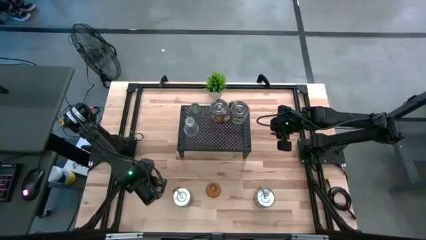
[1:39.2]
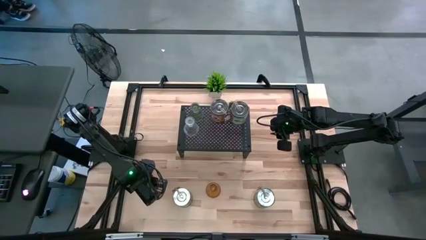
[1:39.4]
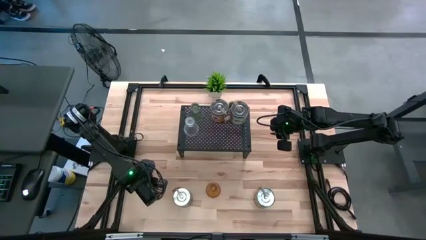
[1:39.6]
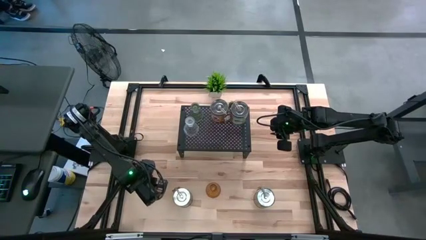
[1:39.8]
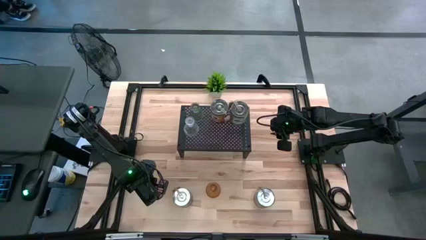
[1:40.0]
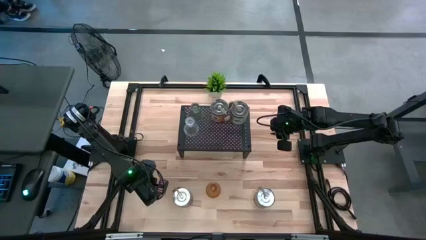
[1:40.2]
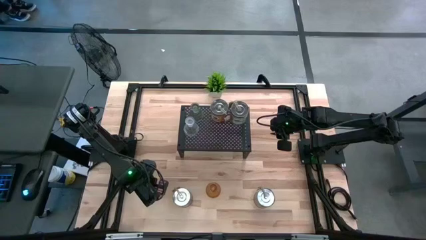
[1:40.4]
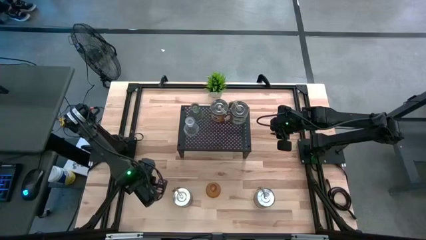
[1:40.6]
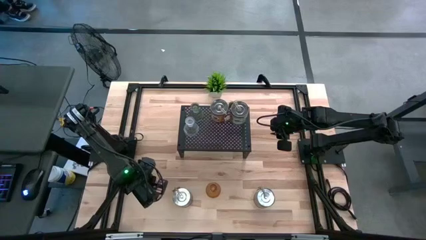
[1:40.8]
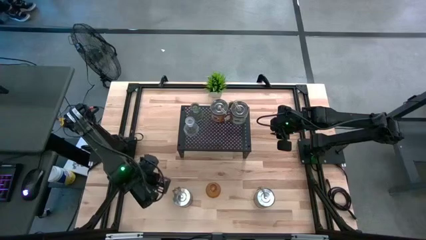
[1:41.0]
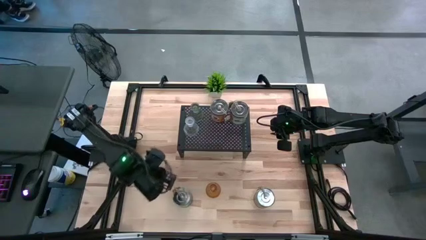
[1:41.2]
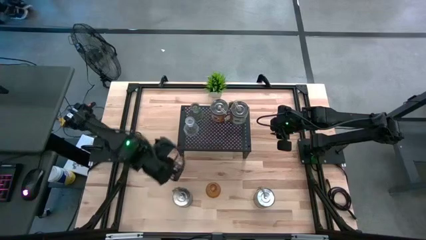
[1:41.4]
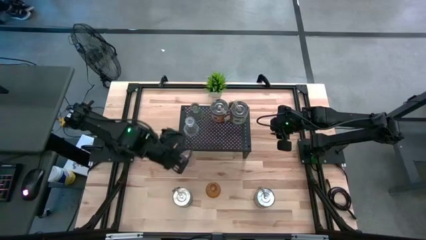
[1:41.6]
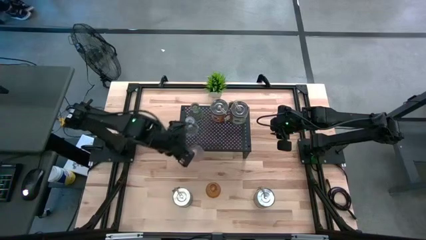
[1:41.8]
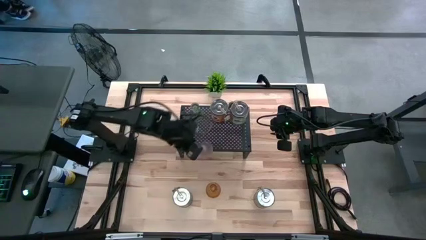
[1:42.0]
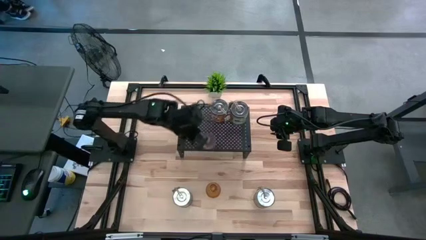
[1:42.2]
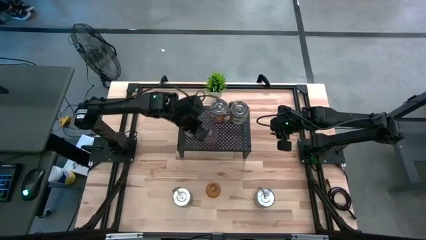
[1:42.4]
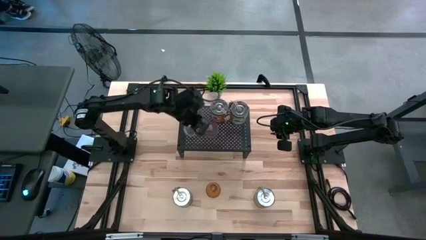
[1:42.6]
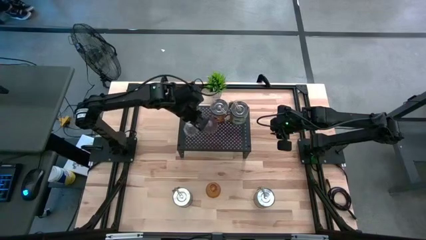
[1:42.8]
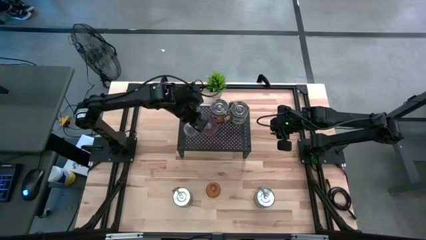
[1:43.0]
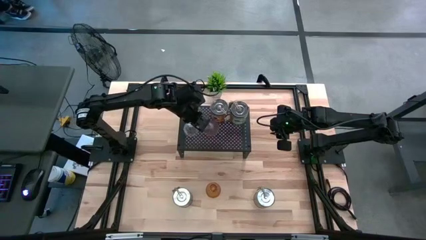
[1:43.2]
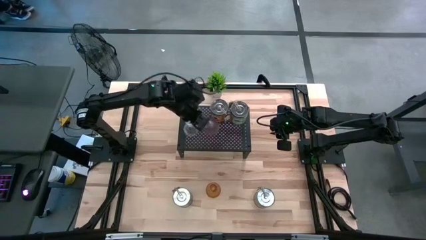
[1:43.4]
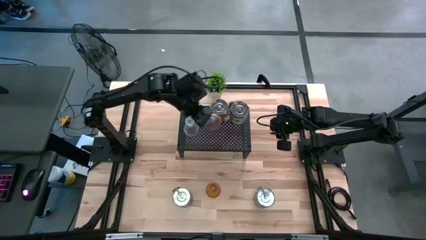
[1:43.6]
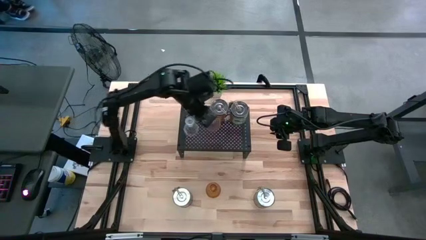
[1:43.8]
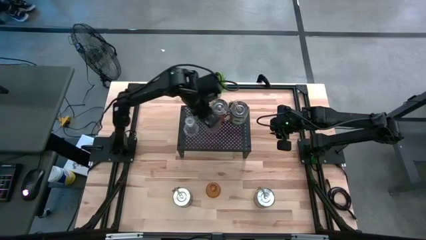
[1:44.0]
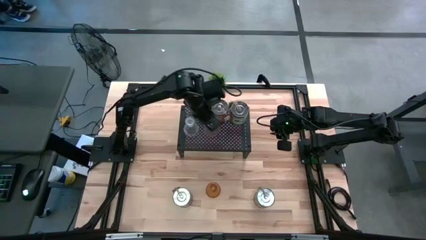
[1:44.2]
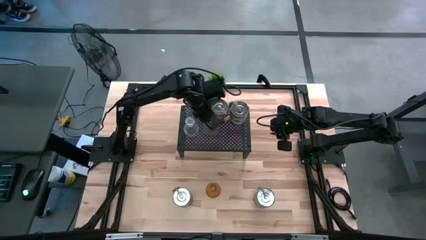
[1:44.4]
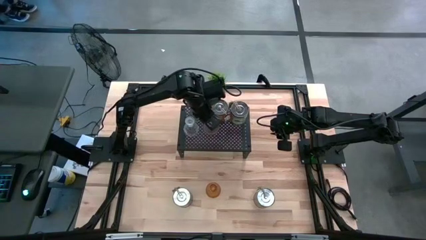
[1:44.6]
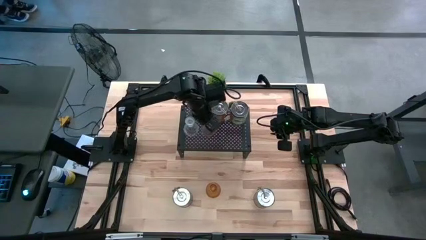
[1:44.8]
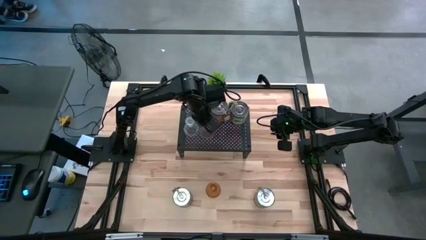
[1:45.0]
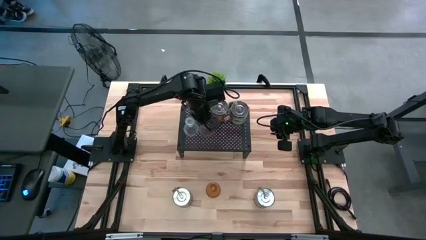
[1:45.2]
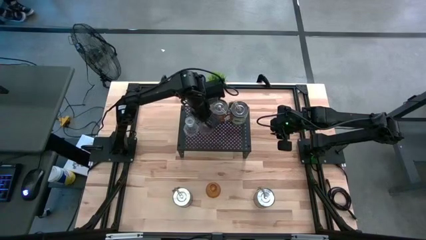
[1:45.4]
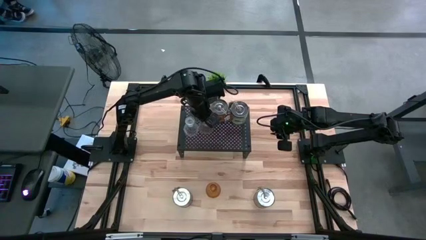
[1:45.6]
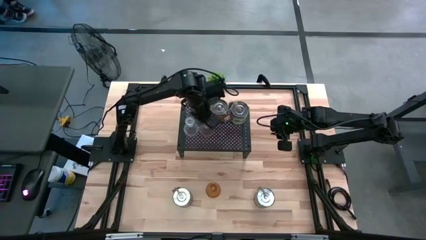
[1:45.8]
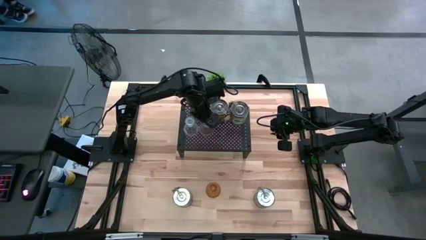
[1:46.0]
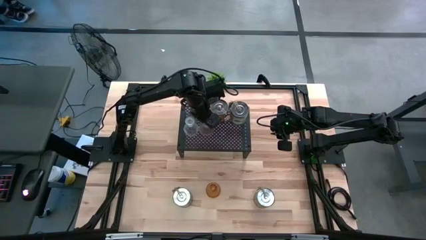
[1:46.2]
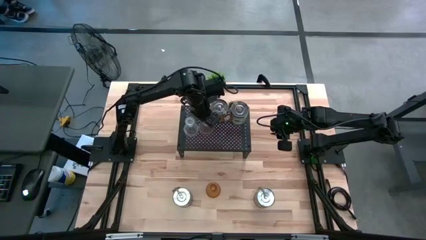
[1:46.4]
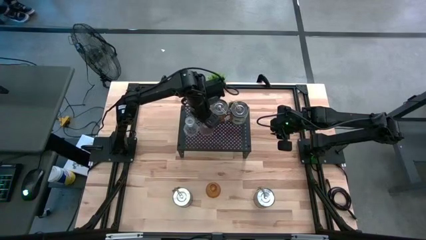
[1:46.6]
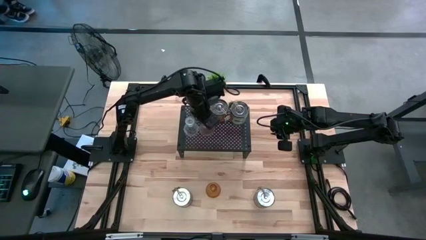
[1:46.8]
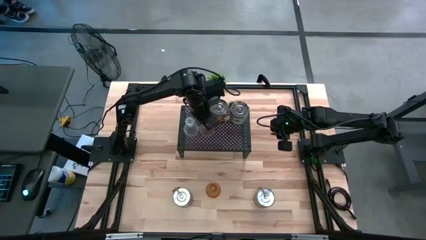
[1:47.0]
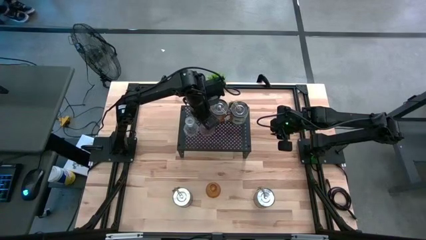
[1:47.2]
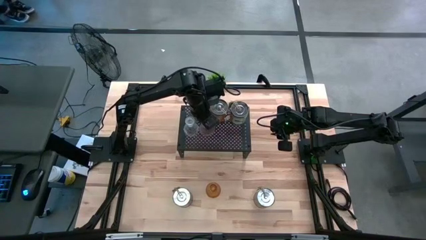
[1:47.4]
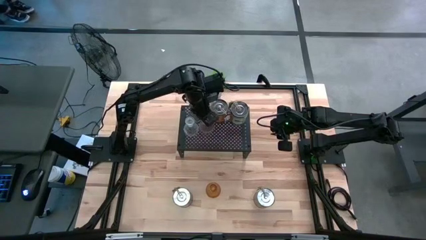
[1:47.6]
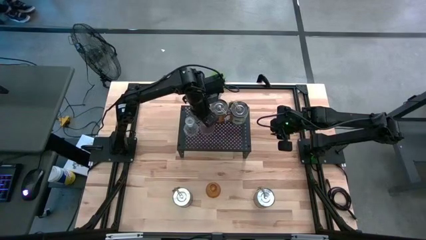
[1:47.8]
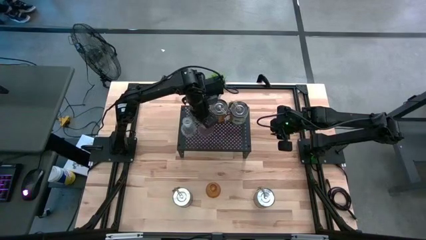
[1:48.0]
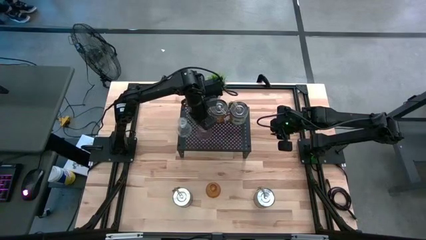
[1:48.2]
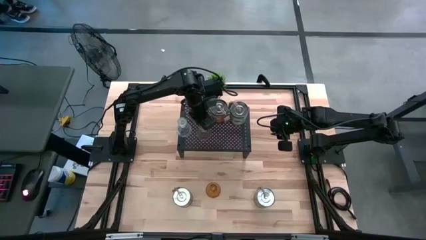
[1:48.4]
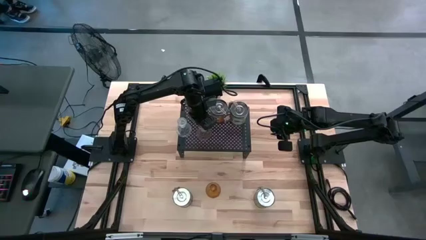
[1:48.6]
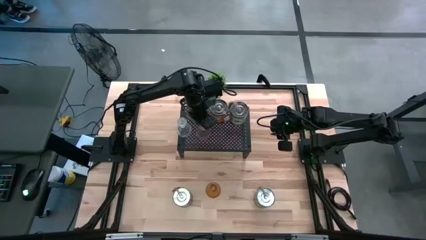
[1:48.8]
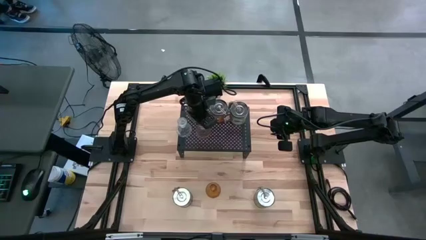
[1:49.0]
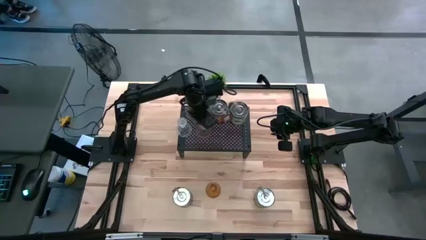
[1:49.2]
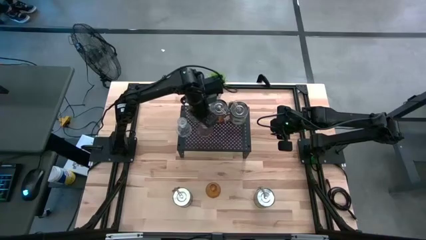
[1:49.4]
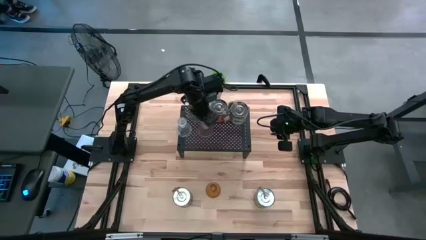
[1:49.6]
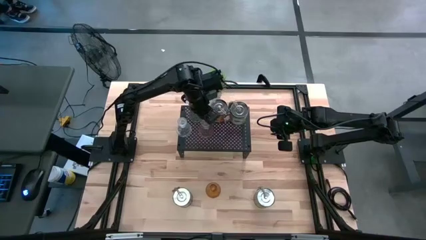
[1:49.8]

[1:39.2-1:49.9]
Task: Pick & Place candle stick holders
Put the pink glass candle holder on the shelf

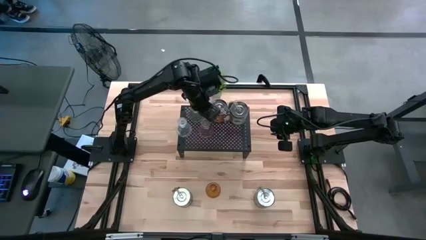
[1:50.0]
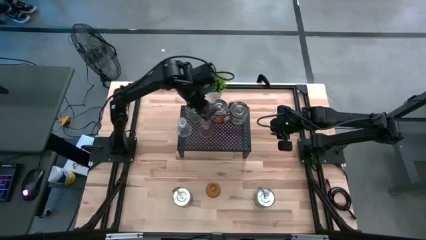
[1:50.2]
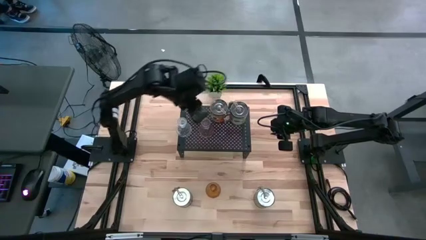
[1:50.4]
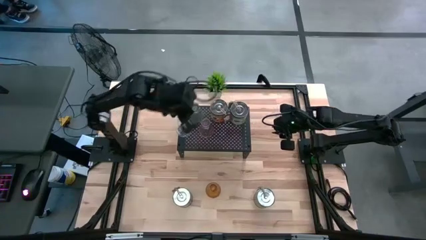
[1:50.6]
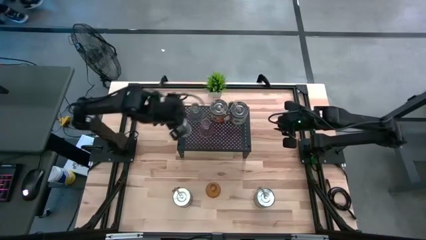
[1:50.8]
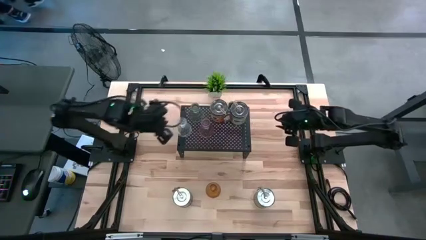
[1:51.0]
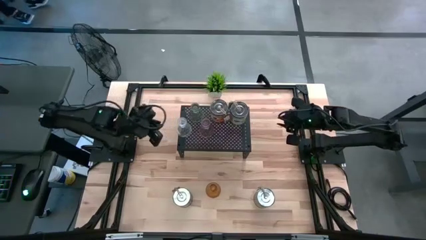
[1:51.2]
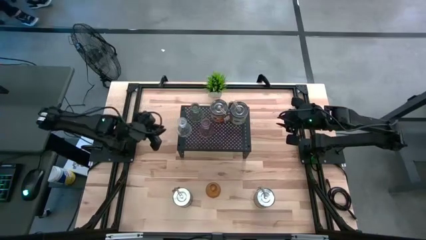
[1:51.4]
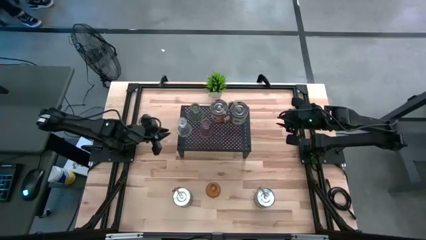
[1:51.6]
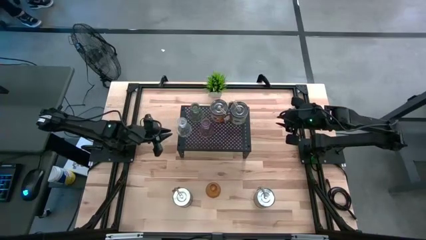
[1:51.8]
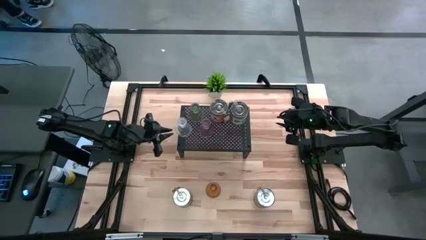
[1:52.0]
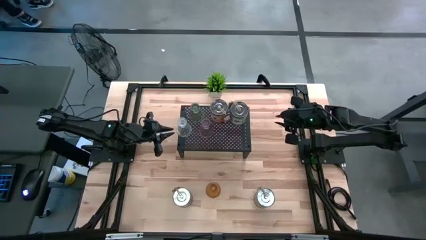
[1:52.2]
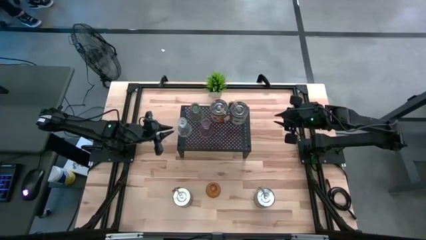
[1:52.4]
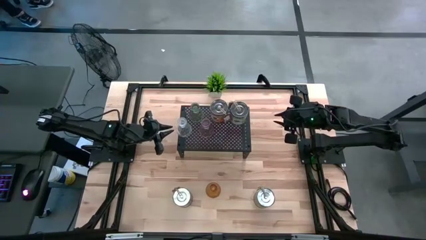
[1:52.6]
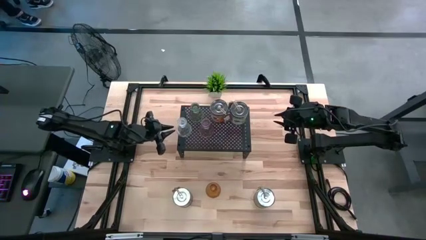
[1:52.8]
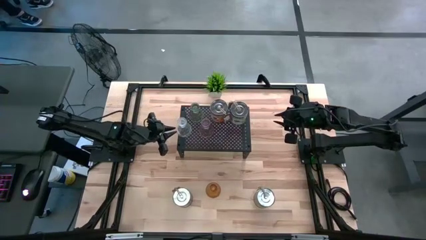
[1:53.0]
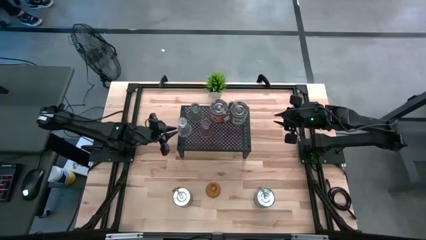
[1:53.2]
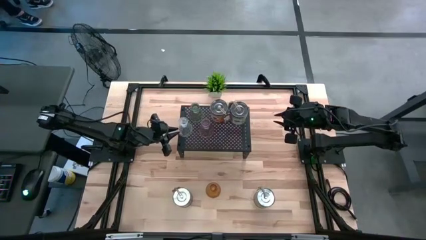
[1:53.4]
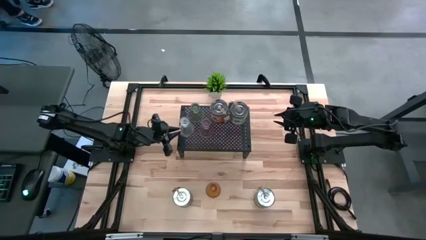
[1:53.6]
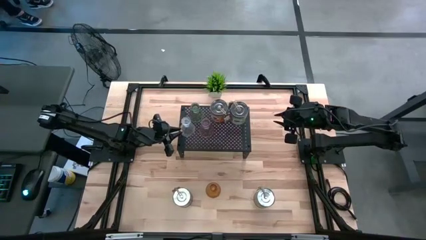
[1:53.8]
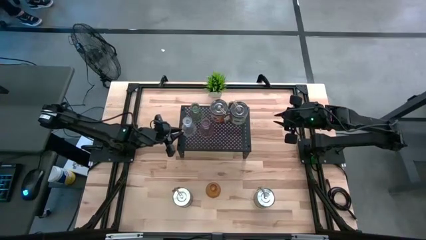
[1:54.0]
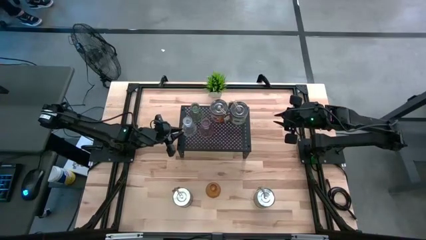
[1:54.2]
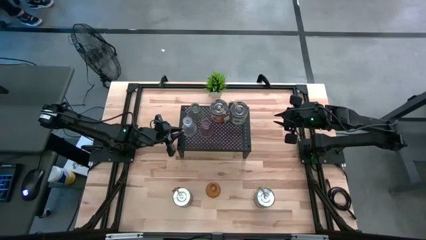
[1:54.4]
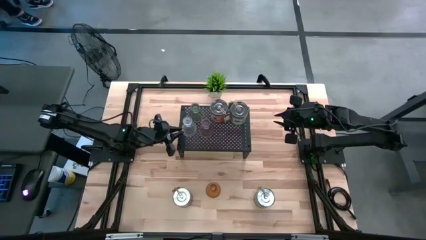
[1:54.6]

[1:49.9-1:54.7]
Adjust the transparent glass candle holder on the shelf
